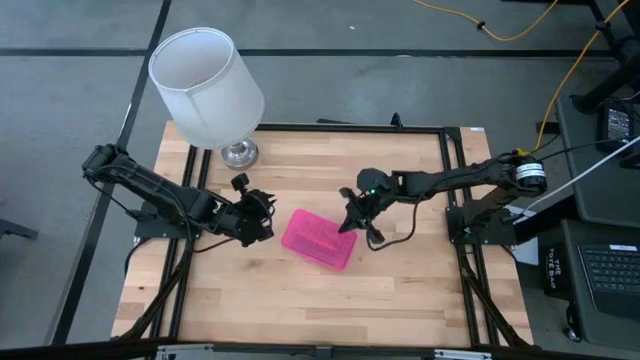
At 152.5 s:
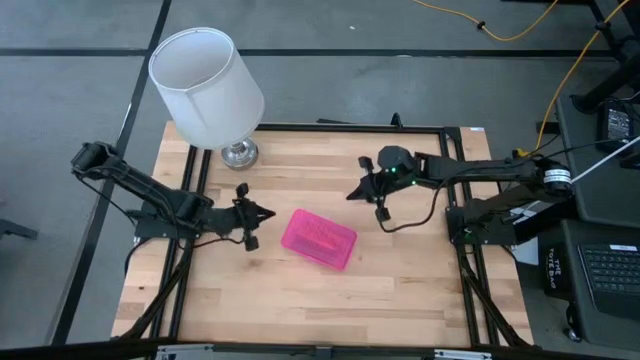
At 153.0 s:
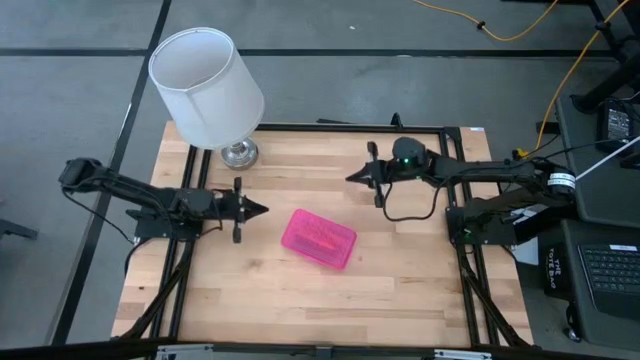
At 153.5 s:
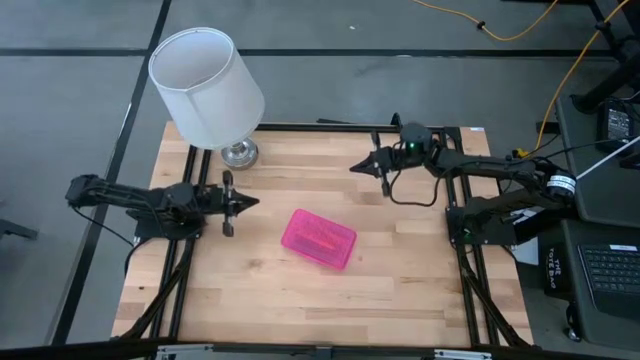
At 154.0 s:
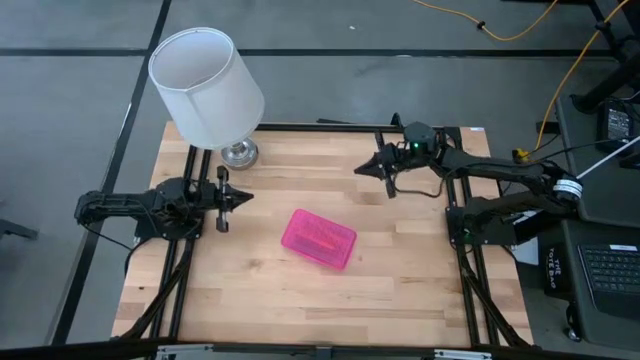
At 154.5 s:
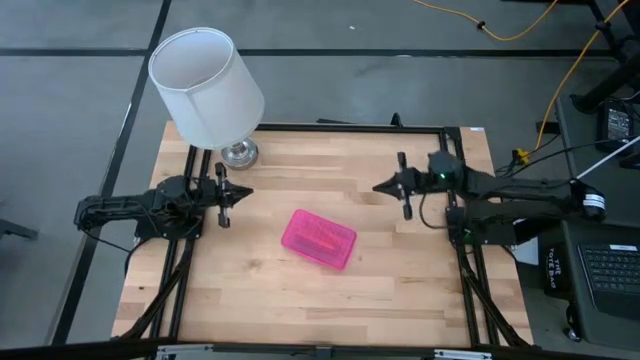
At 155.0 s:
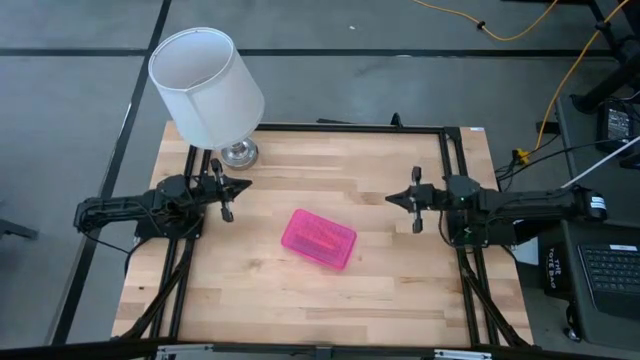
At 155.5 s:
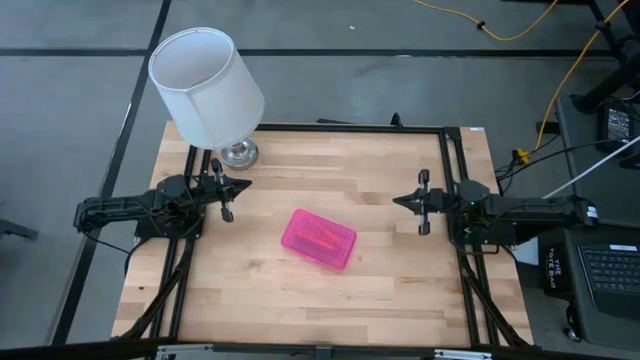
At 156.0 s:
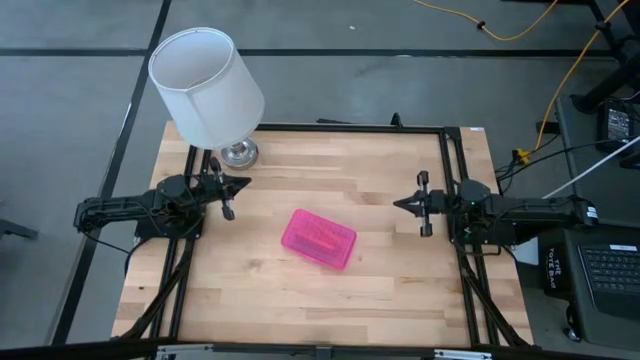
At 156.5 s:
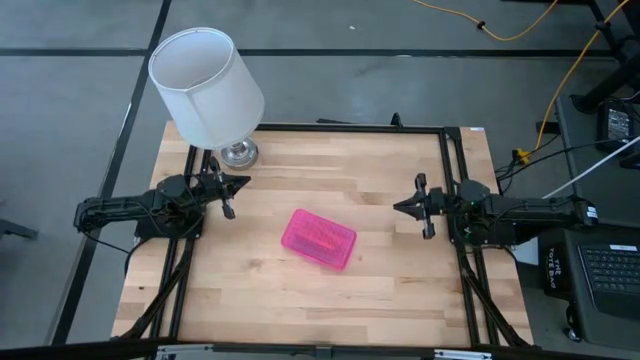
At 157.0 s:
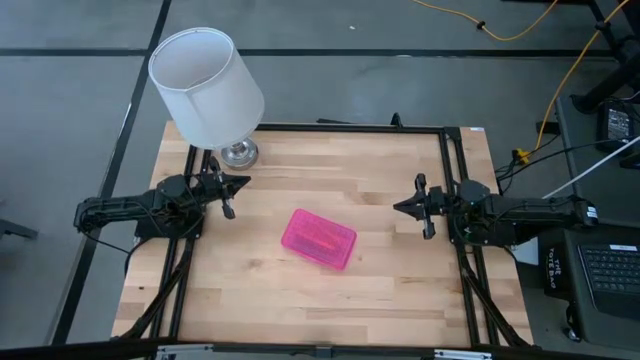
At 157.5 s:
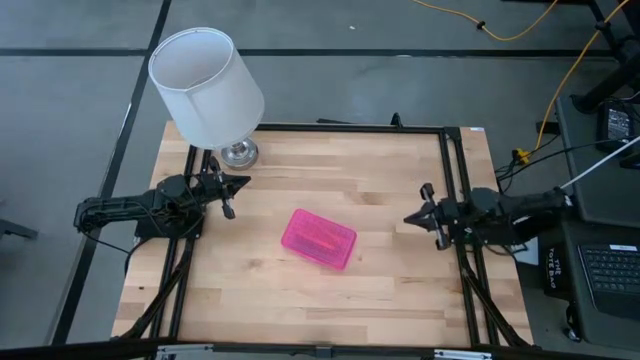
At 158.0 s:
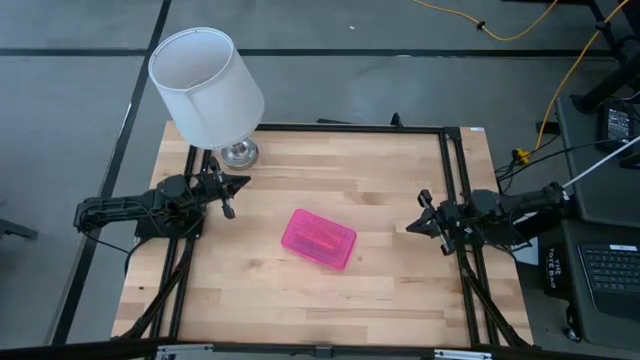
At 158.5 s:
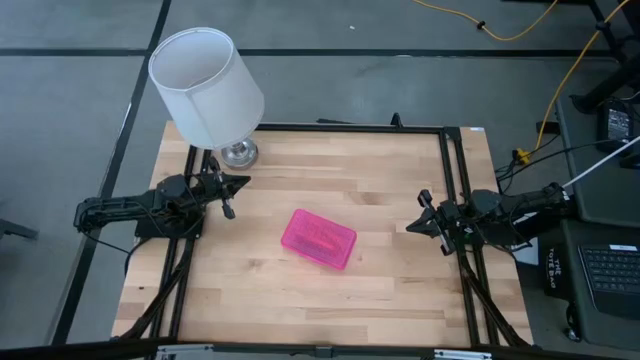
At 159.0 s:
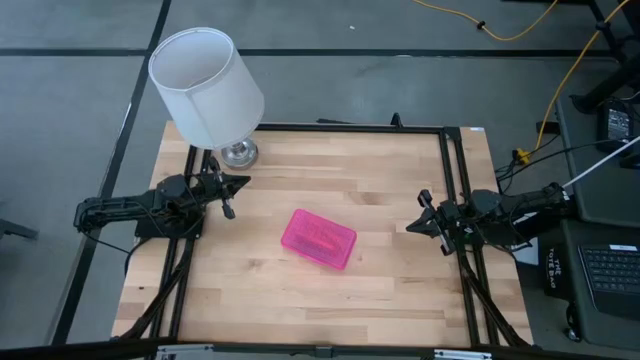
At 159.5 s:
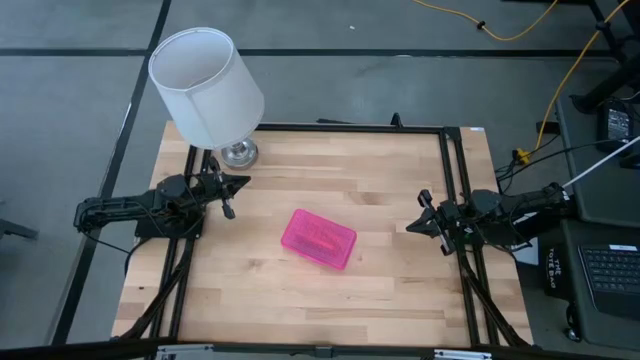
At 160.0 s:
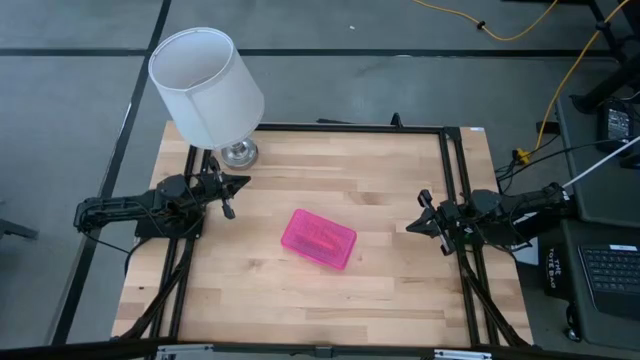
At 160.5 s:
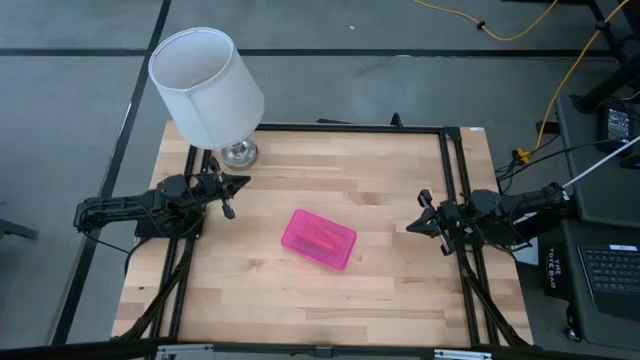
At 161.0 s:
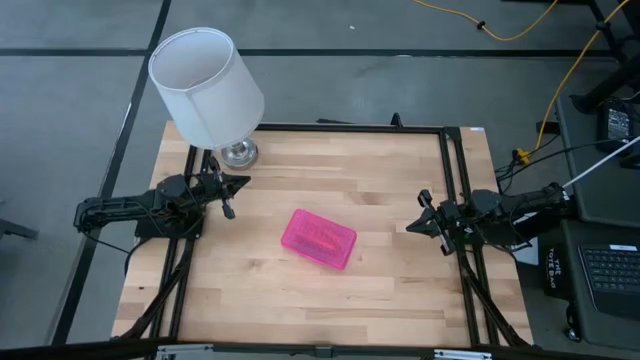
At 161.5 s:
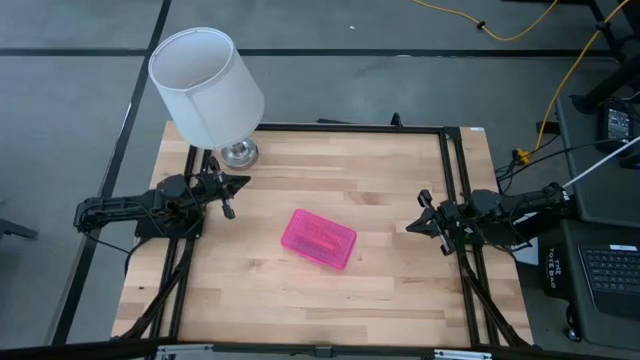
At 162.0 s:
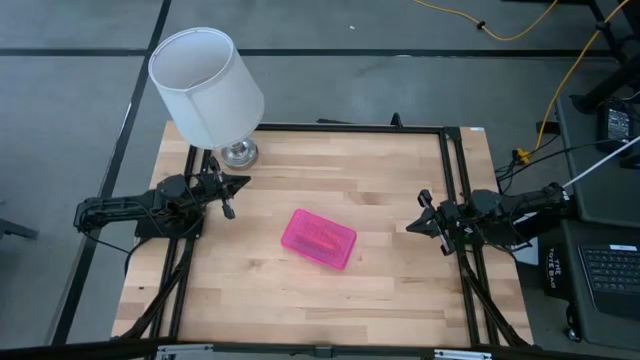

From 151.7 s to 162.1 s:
Task: Pick & place school supplies into a supply box
Return to Home Position

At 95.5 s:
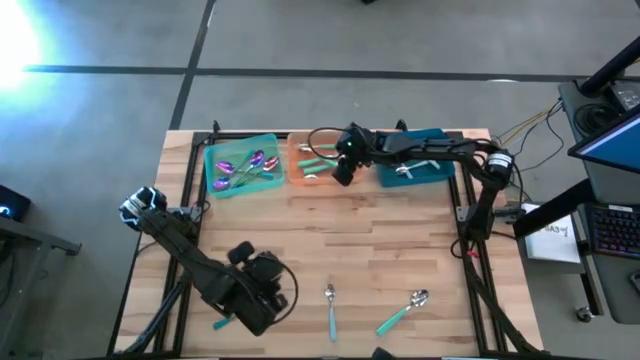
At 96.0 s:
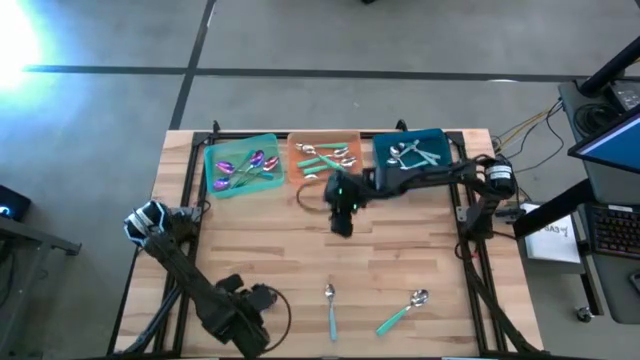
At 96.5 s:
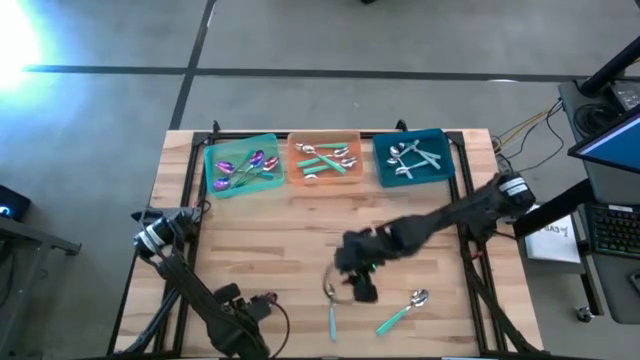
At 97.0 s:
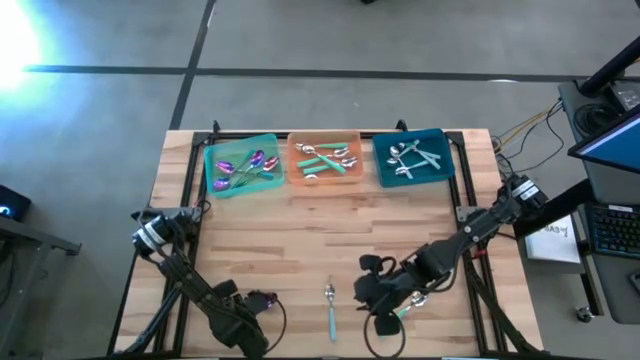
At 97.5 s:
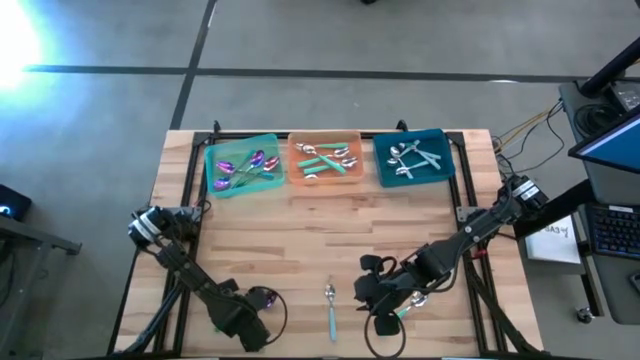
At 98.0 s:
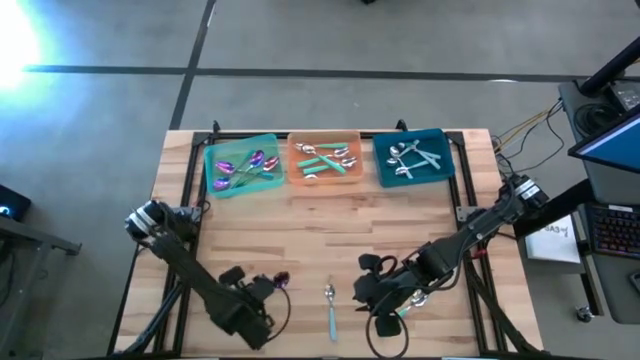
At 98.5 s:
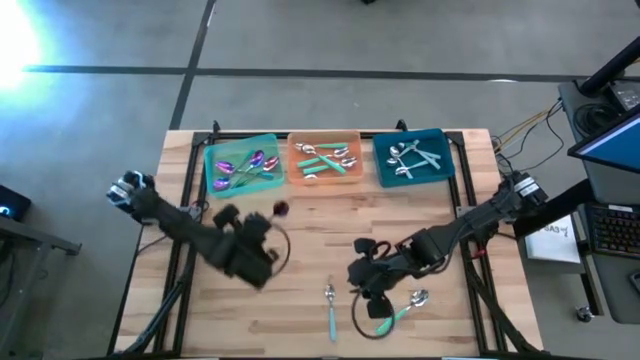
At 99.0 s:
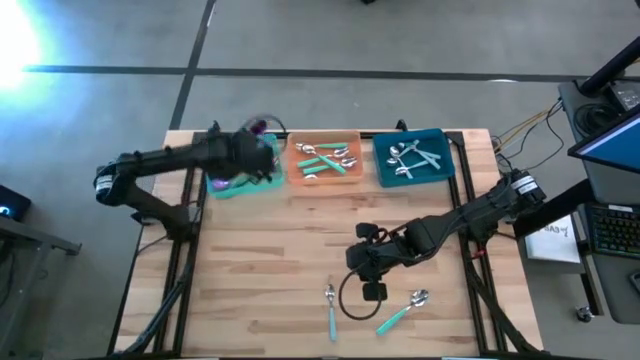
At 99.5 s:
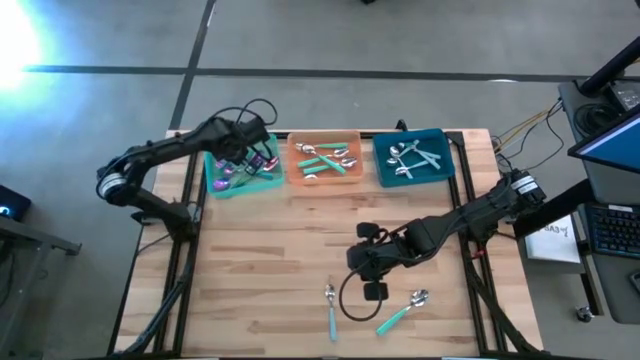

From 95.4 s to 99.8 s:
Task: Sort silverware by color (type)
Put the blue spoon into the green bin

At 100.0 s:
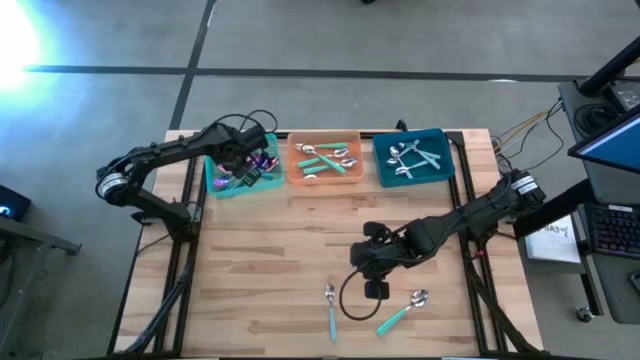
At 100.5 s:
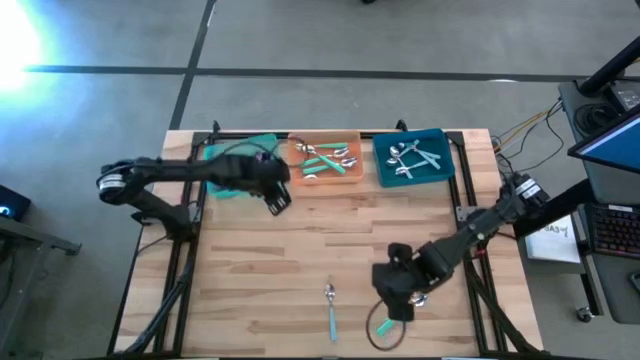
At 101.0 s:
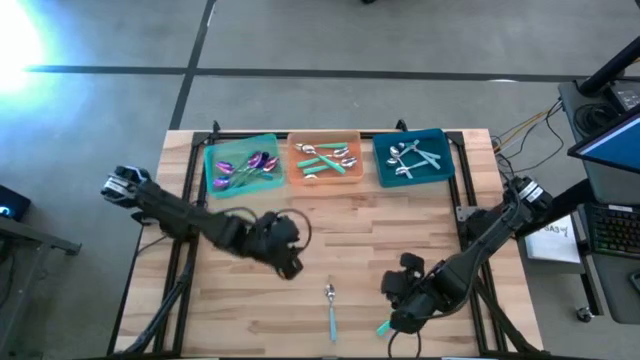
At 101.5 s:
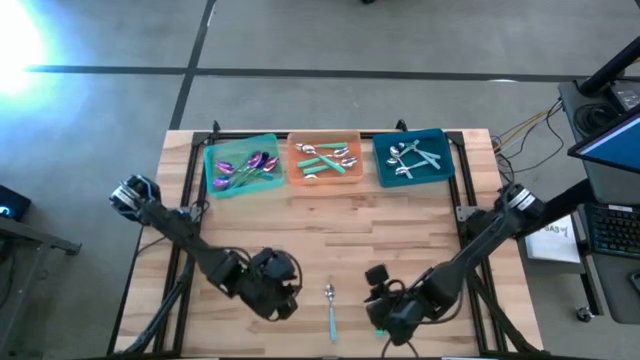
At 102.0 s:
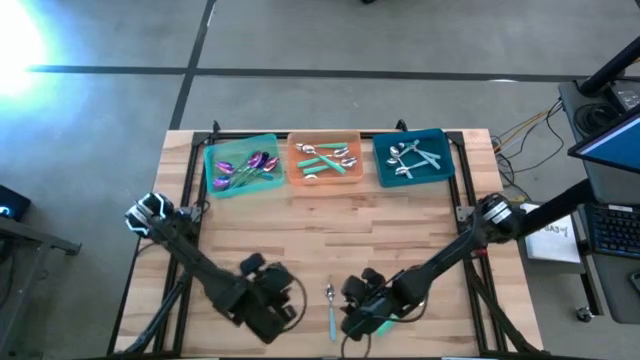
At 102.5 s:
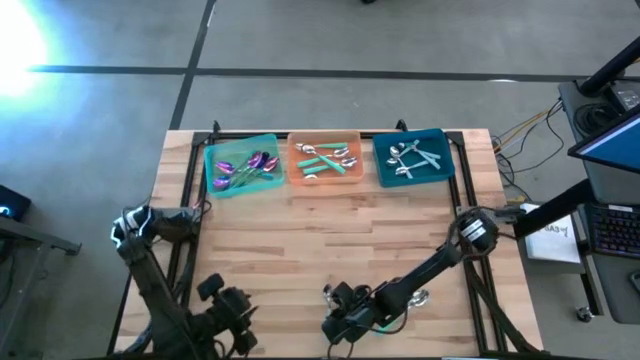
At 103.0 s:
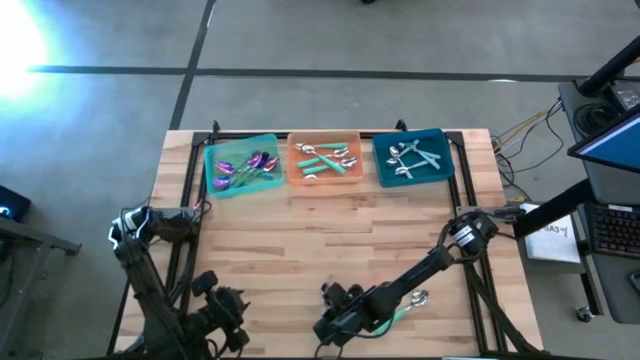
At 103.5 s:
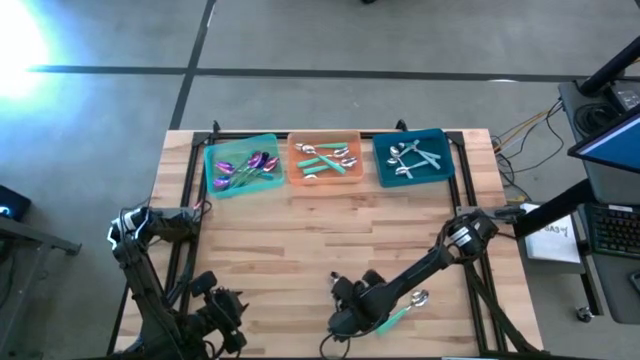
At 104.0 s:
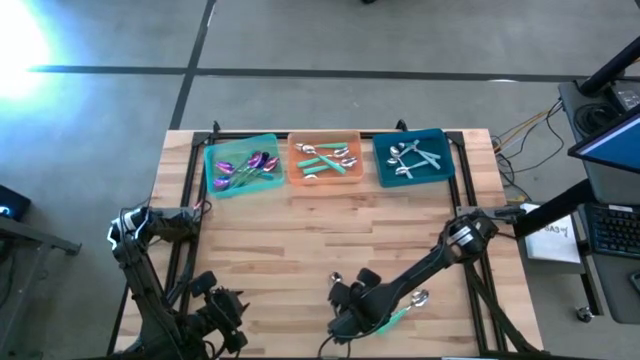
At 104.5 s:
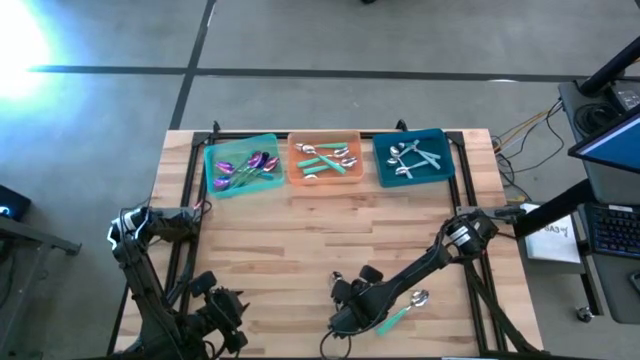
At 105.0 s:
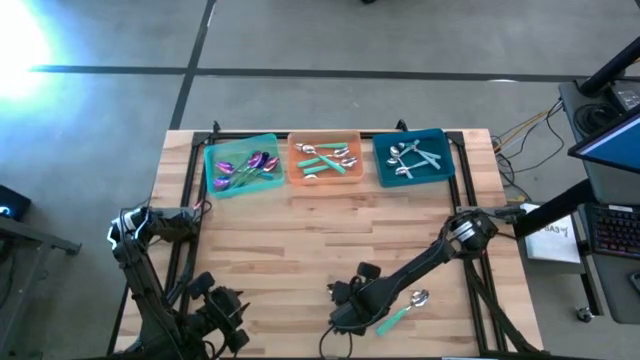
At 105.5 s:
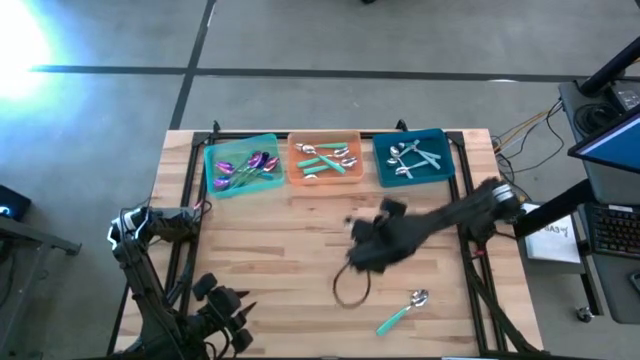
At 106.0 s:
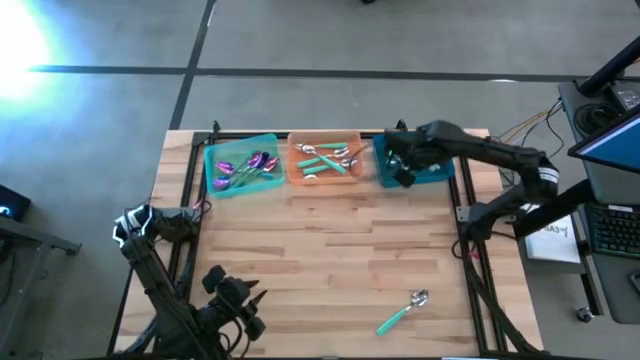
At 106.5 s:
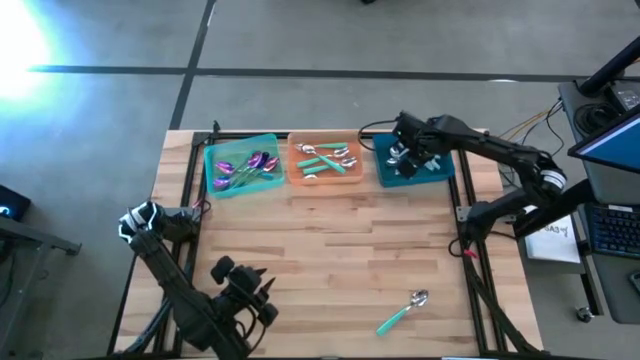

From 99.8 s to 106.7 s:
Put the light blue spoon into the blue bin
